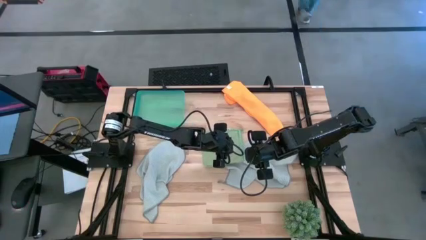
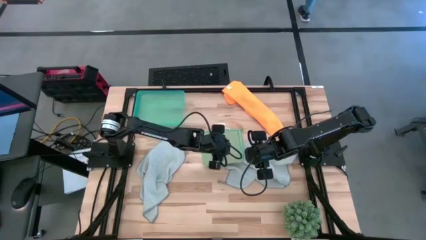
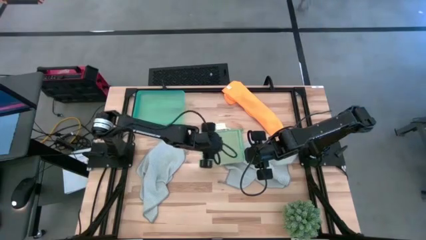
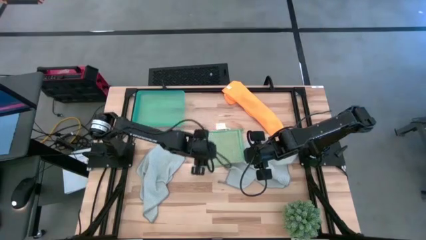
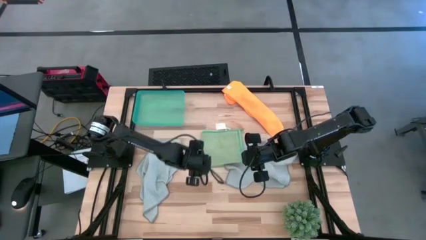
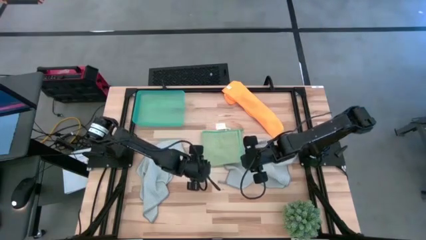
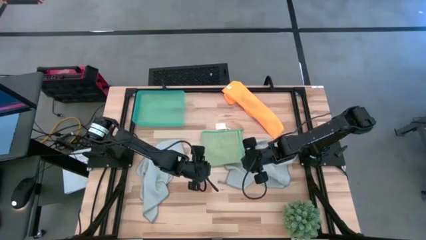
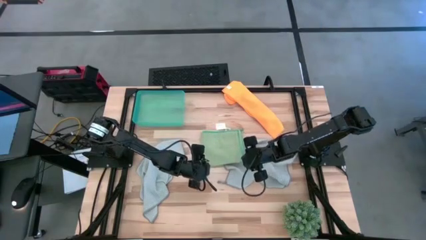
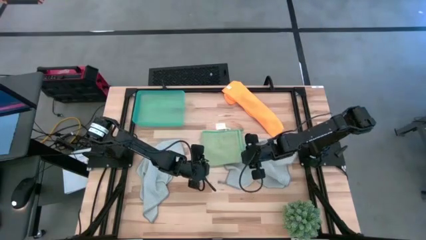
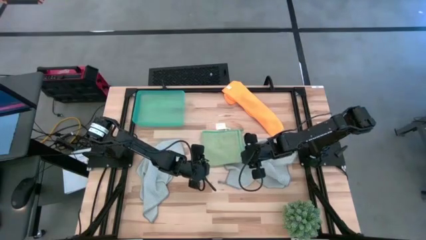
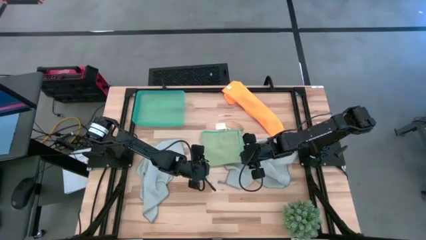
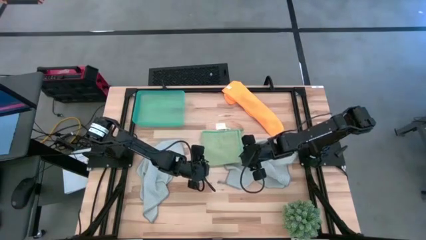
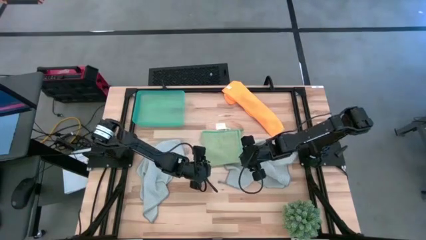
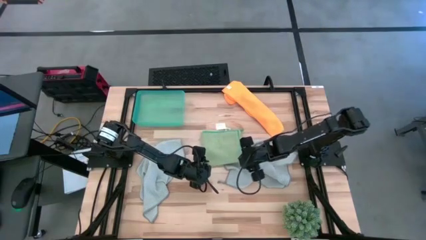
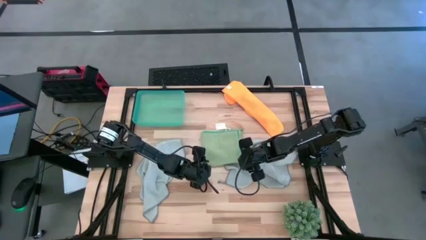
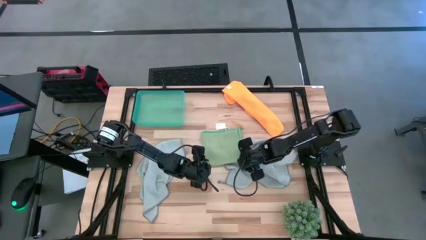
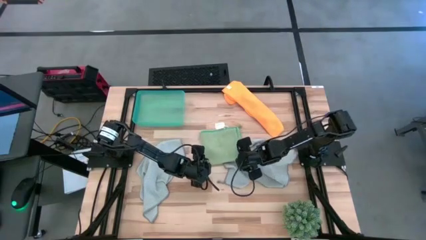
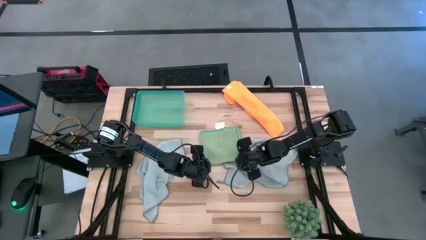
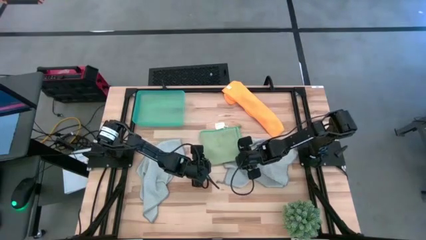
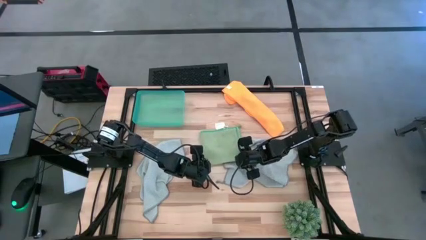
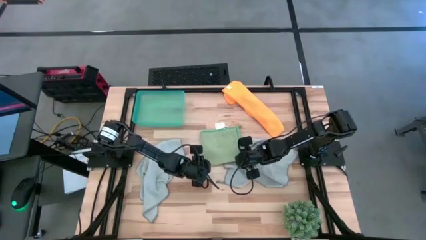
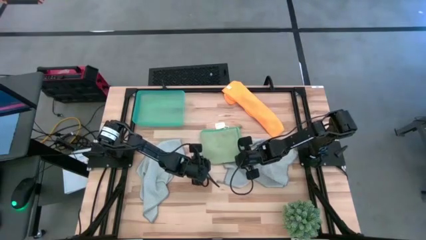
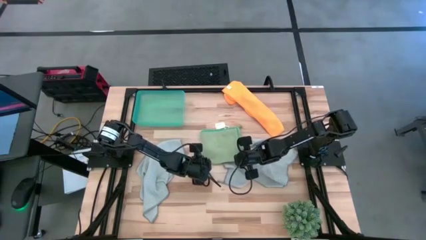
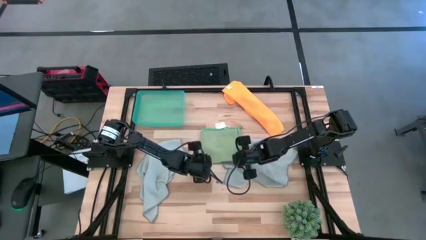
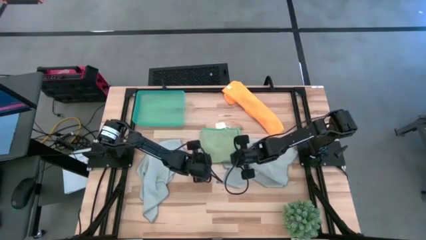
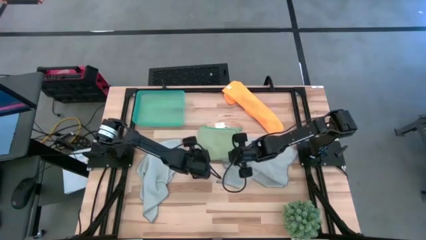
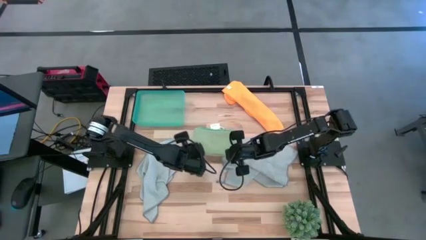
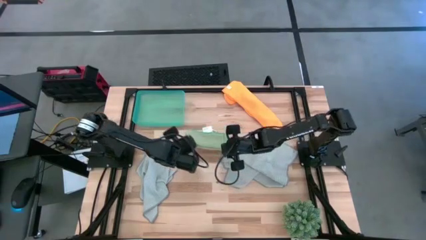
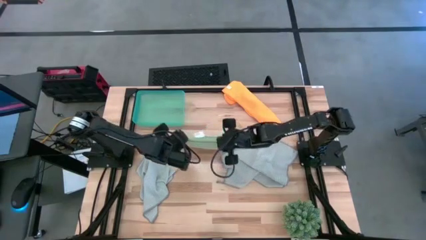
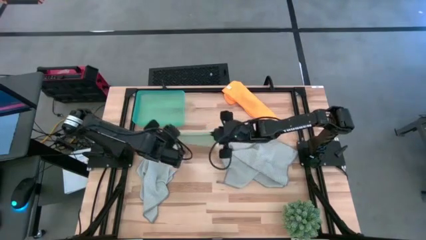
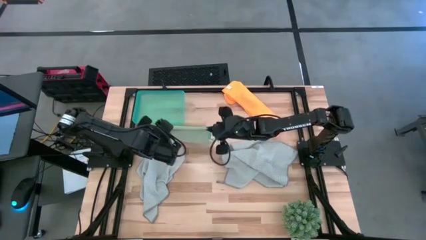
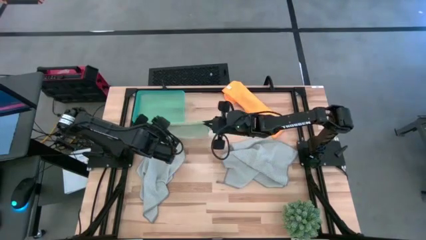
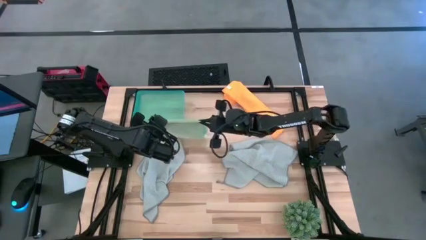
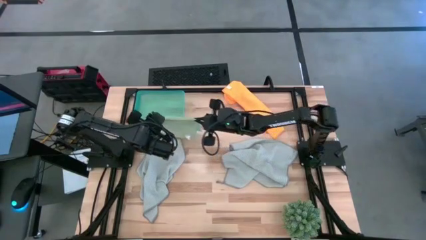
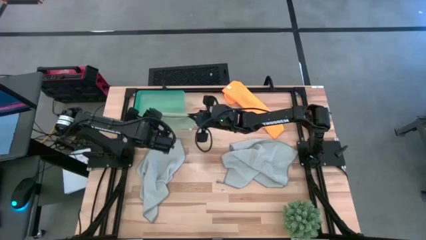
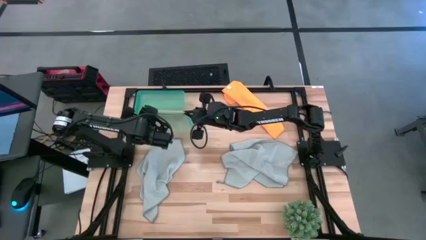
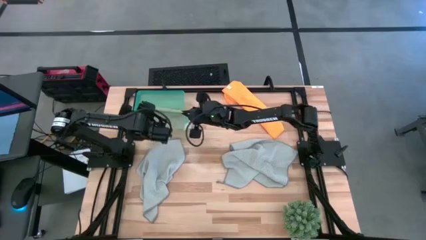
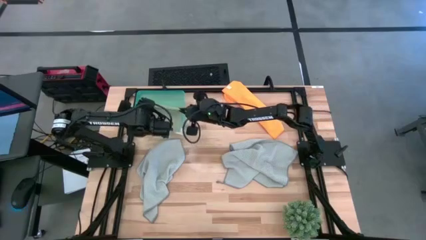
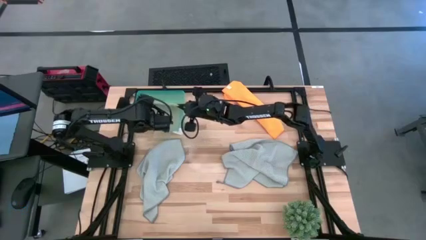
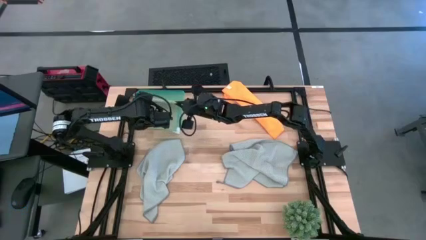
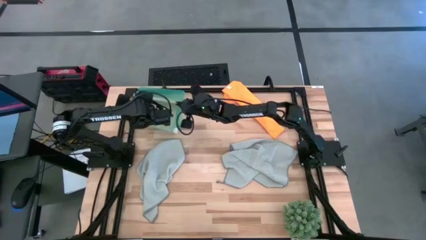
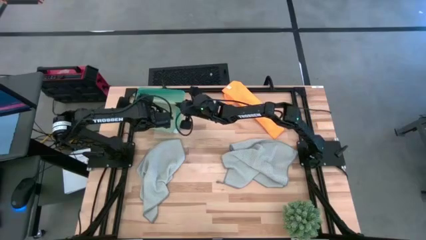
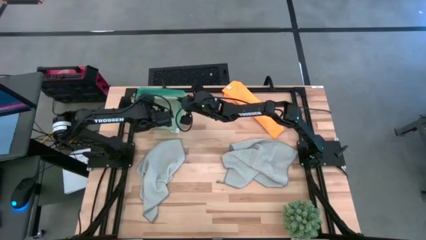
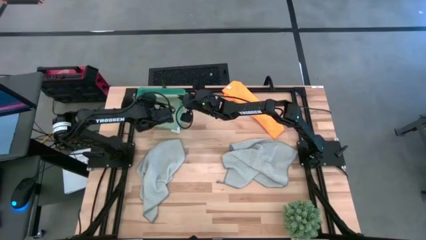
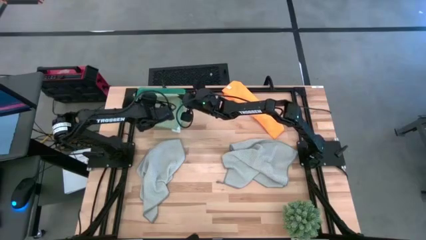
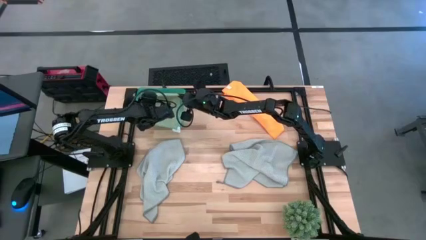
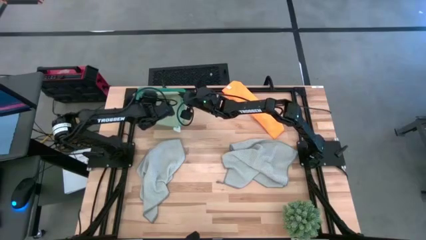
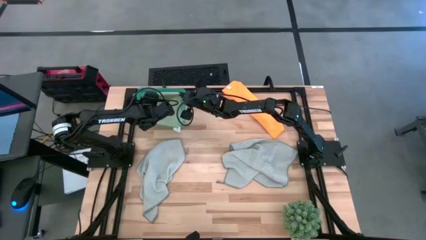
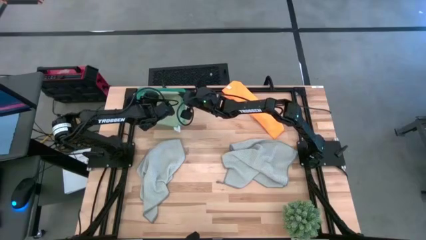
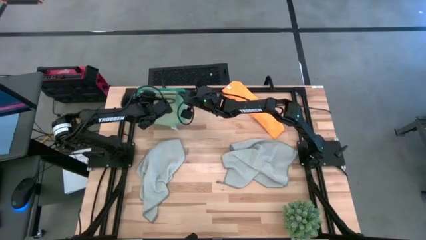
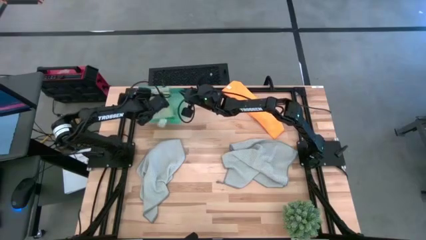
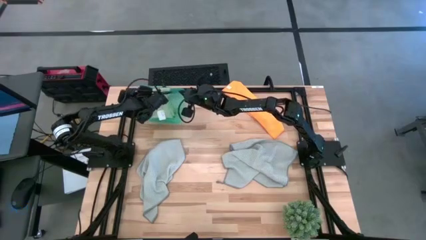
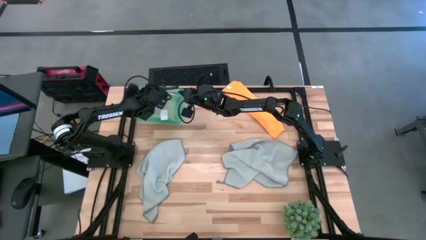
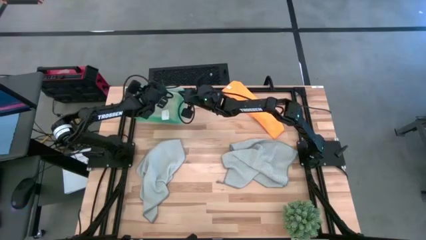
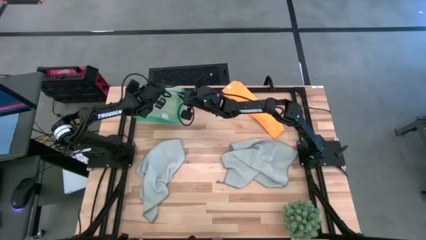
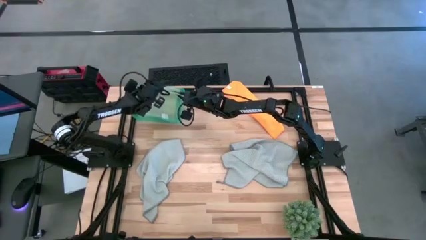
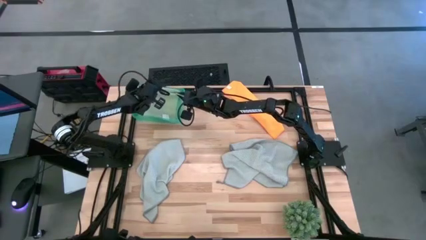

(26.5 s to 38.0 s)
Task: Fold microfiber towels
Put the folded green towel into the bin

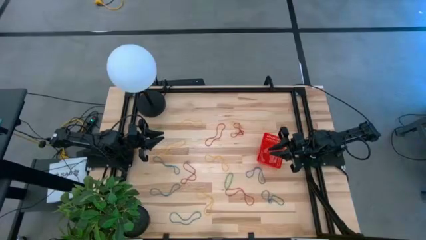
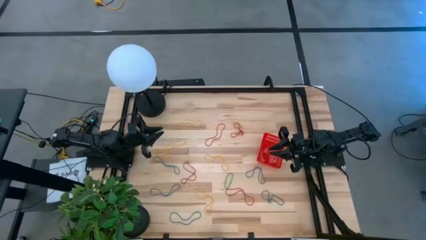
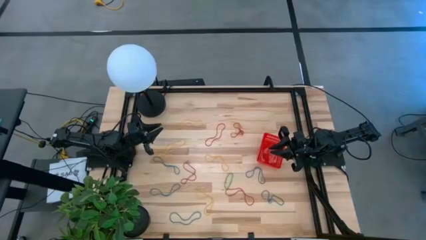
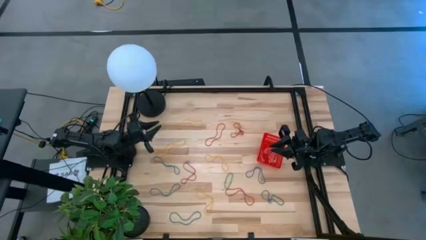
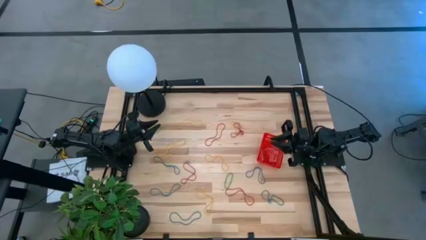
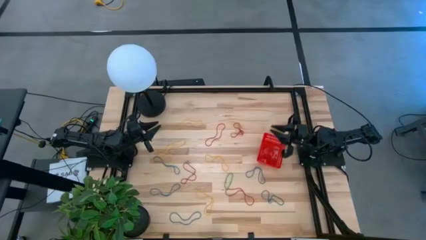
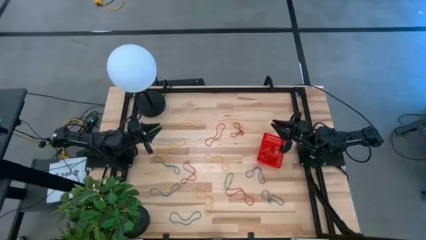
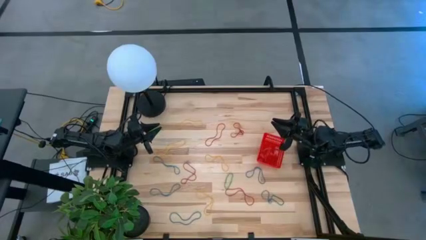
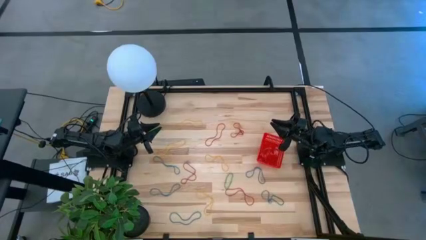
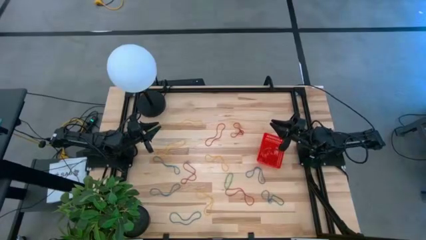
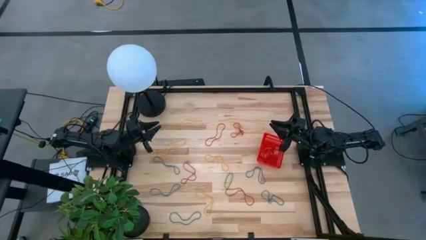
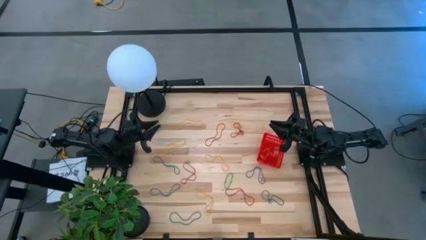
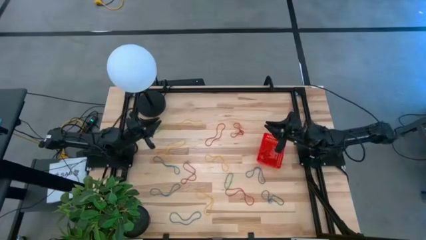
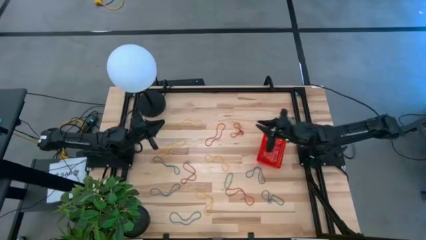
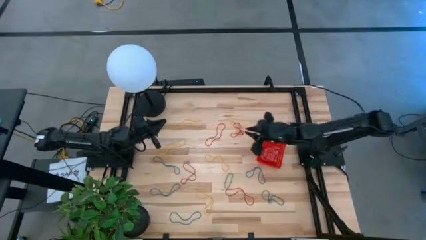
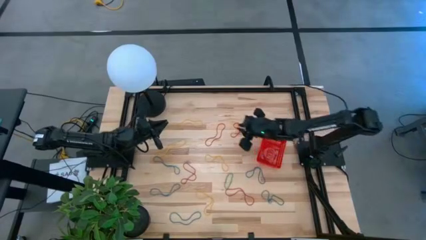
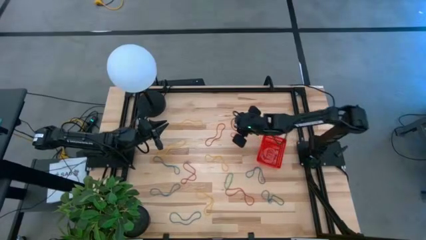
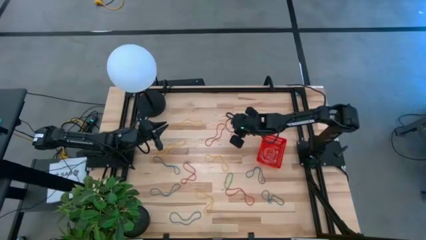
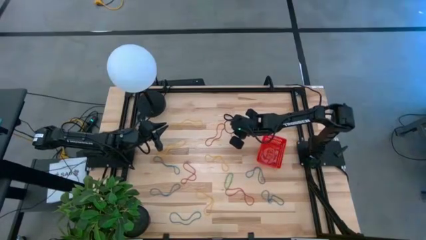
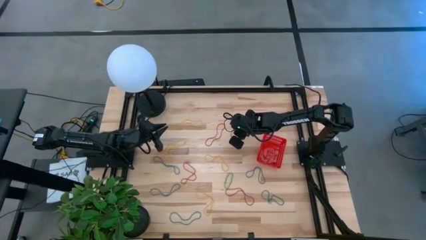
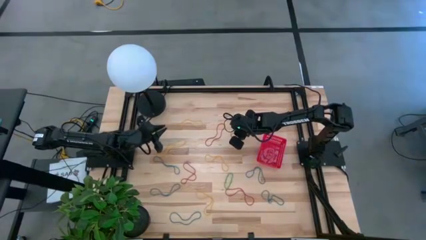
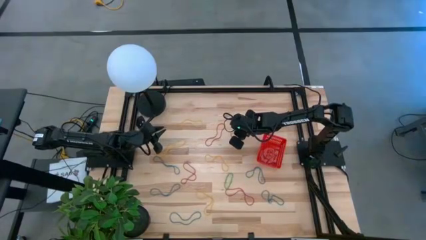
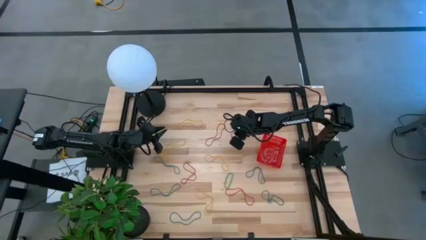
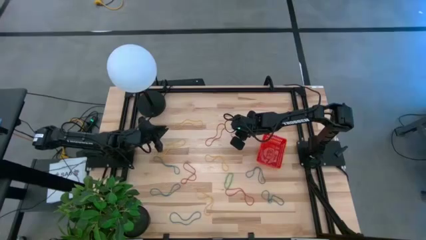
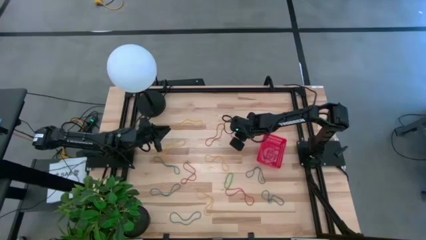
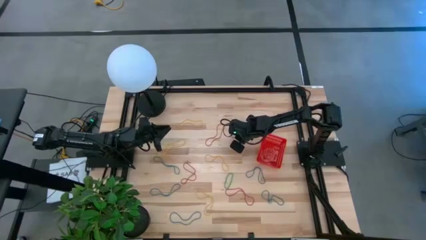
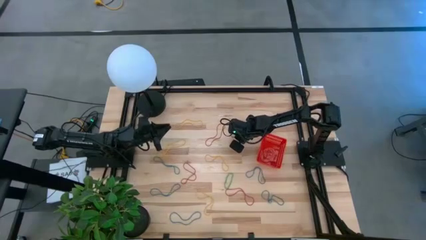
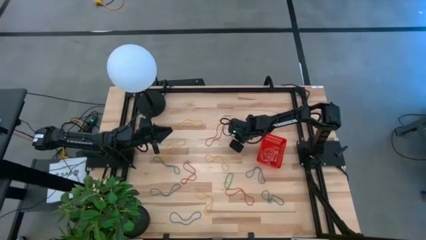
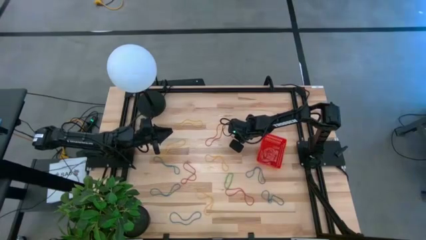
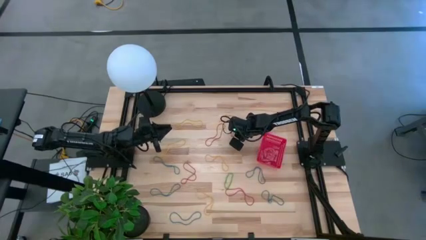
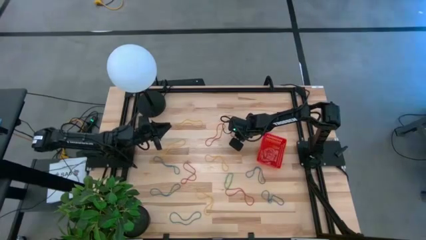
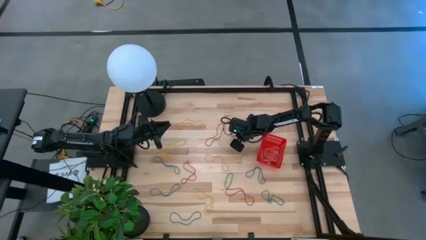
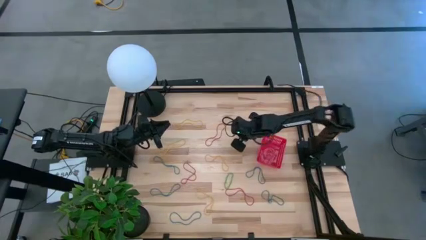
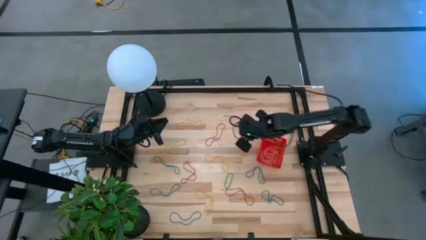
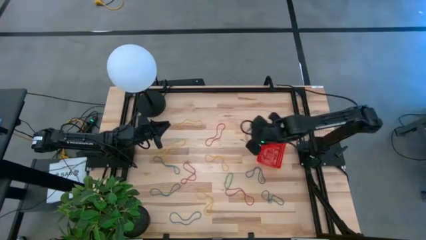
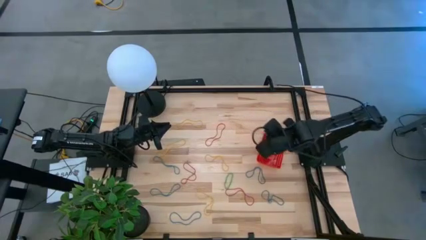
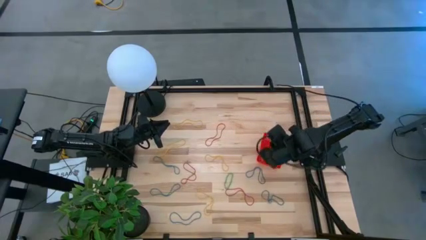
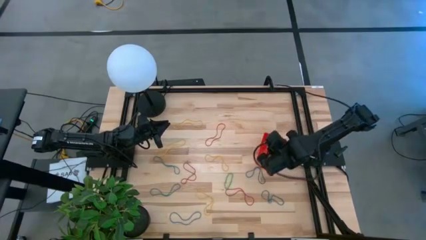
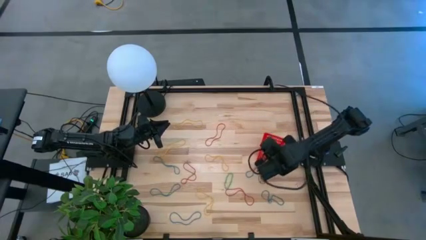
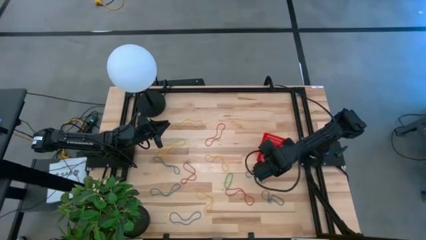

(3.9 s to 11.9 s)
Task: Pick and place rubber bands into bin
Put the red rubber band into the basket
